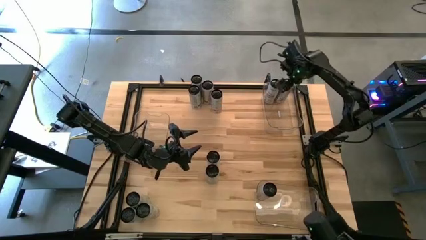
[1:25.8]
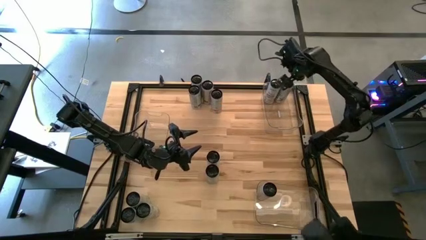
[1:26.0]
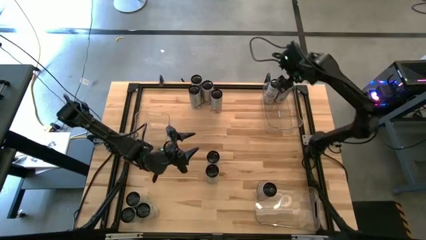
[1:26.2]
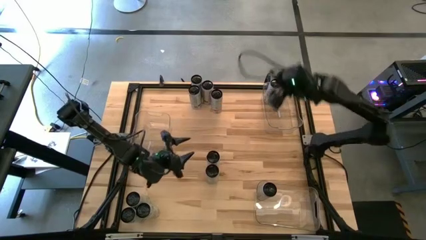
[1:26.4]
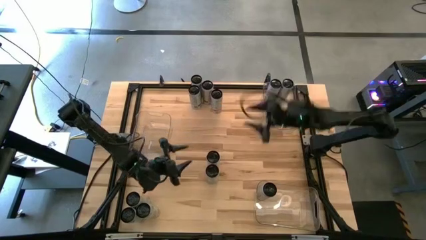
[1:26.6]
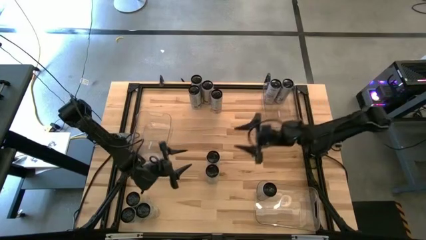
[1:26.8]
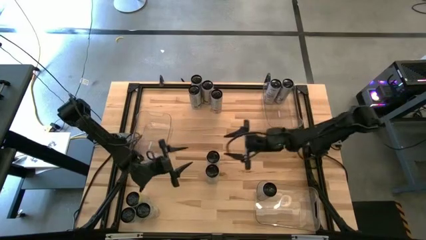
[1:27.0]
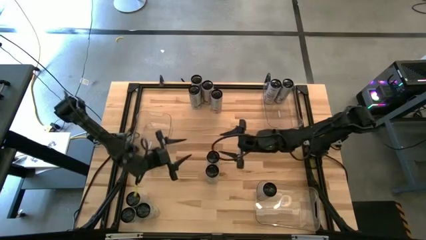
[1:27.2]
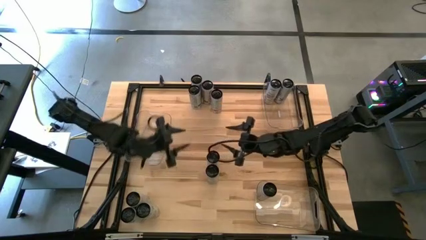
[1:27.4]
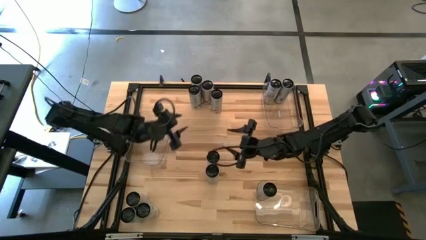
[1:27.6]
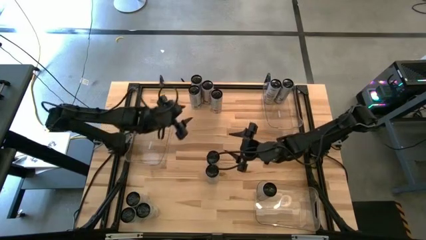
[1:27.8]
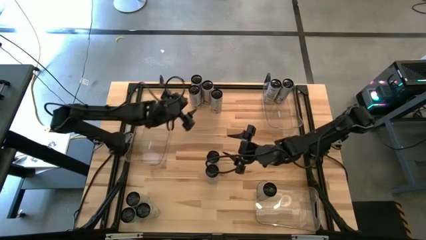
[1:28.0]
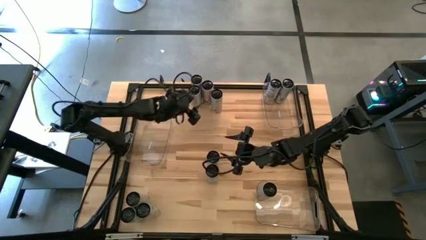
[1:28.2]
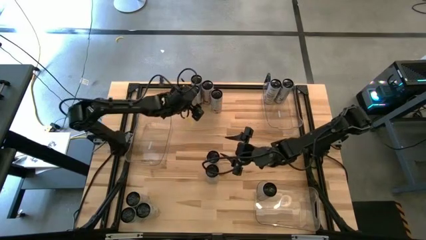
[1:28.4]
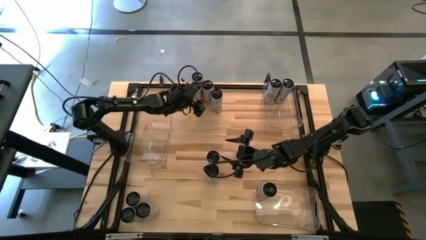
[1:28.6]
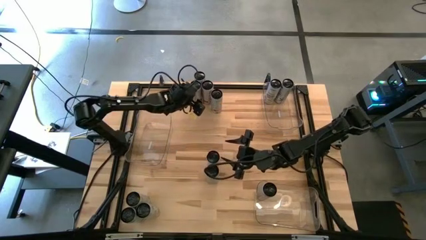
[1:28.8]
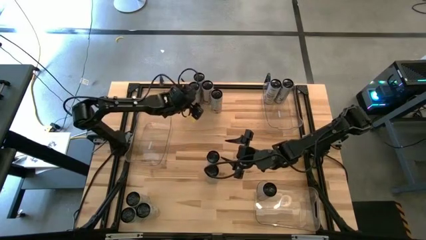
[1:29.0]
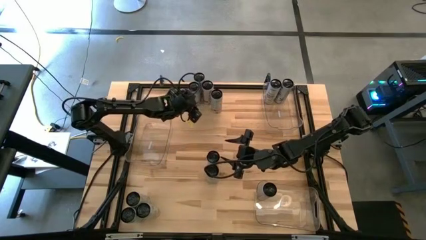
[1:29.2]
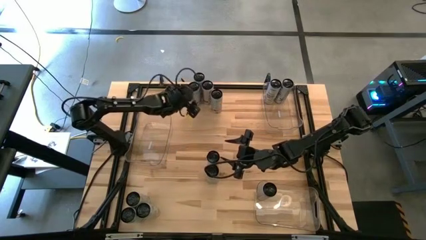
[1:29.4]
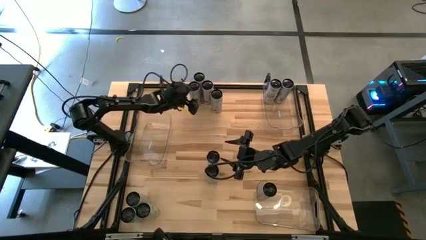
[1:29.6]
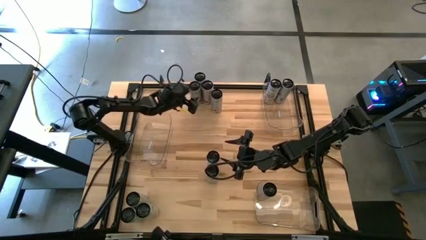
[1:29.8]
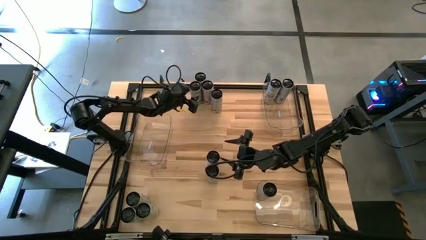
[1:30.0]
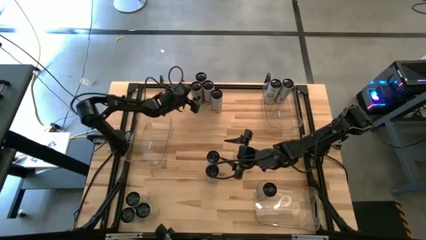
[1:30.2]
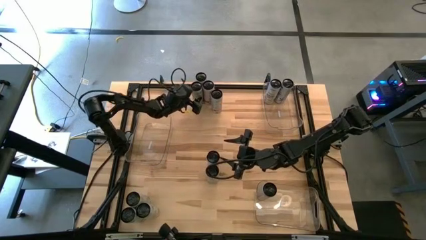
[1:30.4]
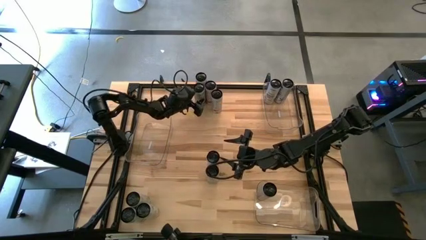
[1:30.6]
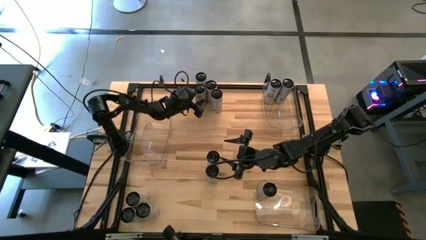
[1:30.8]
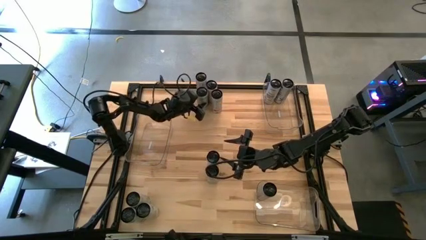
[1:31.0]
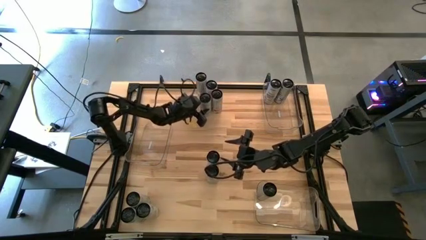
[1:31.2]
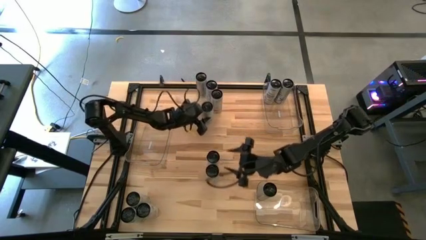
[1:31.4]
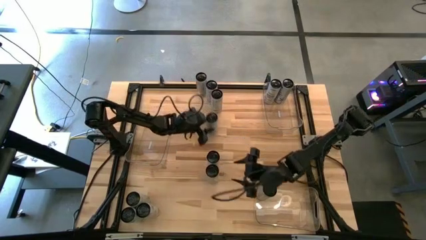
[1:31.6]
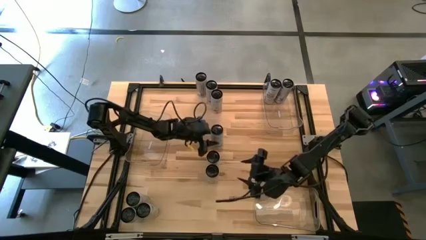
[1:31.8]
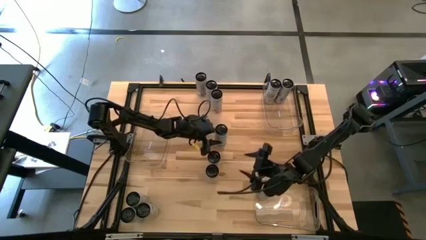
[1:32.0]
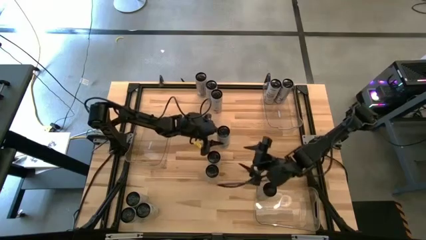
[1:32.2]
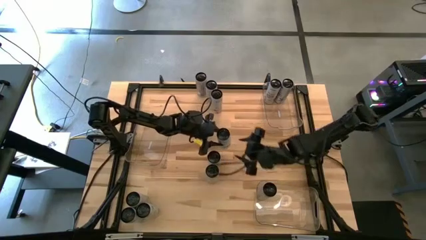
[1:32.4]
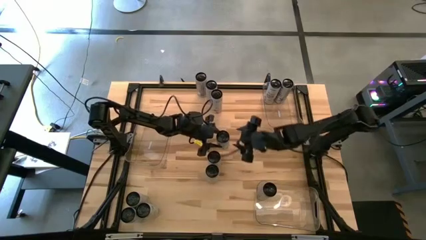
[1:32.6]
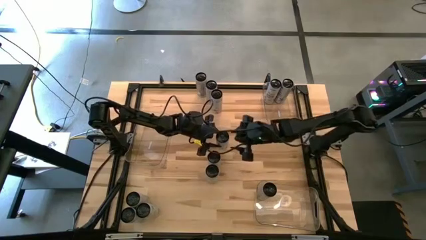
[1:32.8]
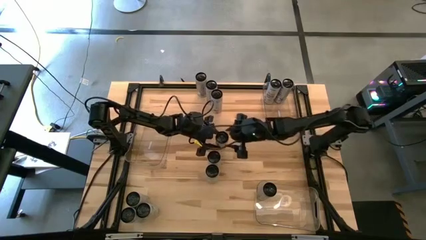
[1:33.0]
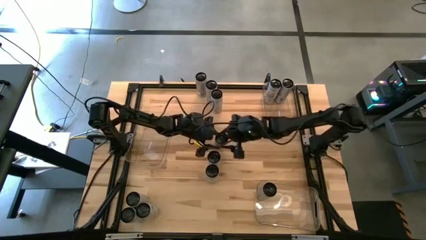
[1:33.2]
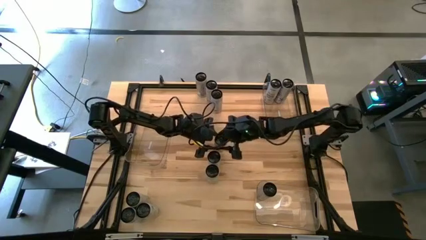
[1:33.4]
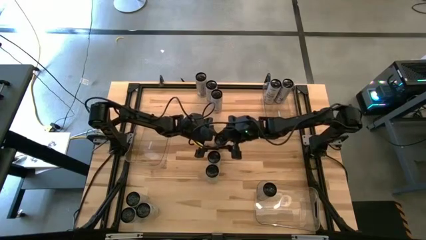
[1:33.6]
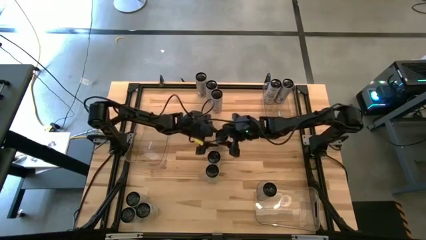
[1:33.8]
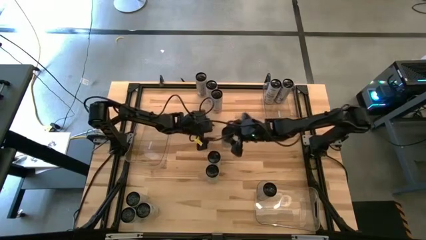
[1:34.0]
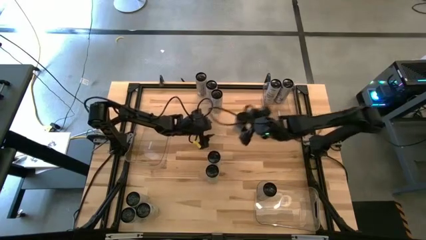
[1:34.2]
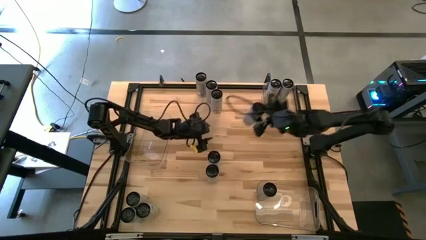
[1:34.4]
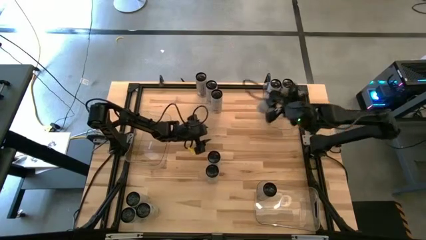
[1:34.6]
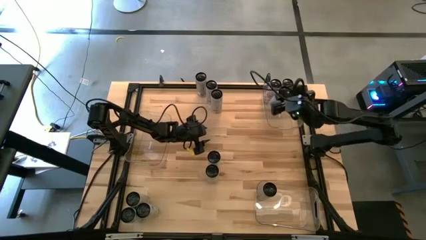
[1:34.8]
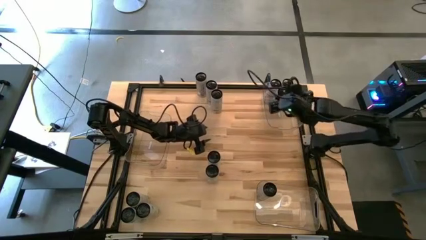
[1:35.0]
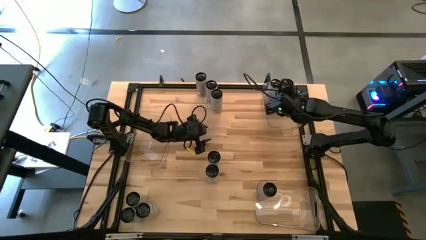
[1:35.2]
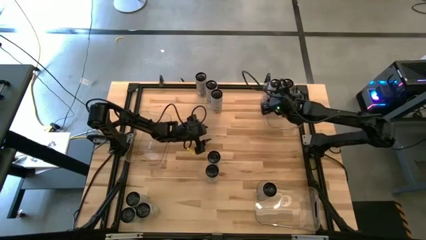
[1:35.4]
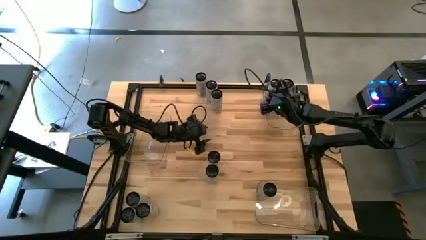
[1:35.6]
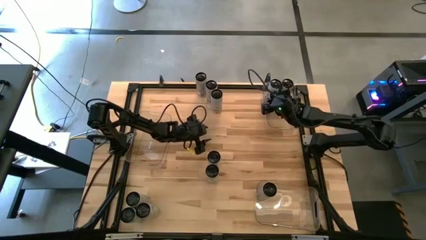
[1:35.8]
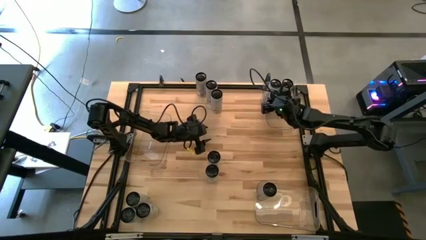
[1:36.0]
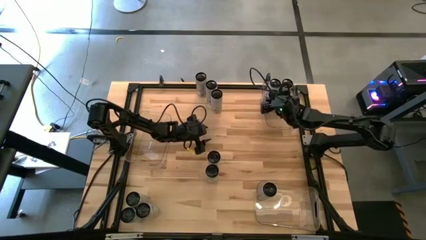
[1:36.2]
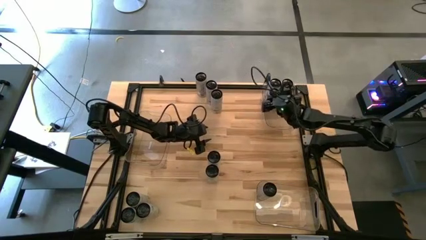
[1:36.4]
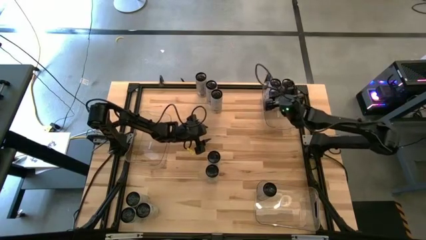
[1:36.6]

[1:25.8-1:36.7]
Task: Sort soda cans
Put the white-blue soda can into the top transparent bin

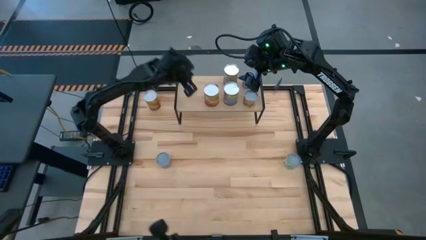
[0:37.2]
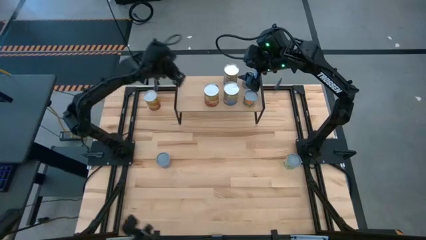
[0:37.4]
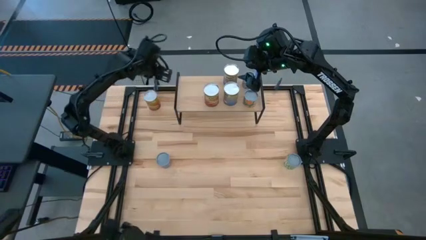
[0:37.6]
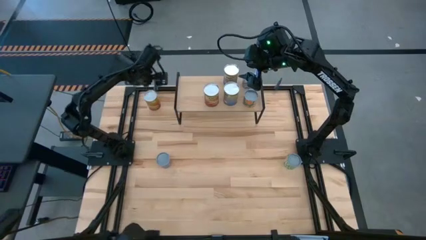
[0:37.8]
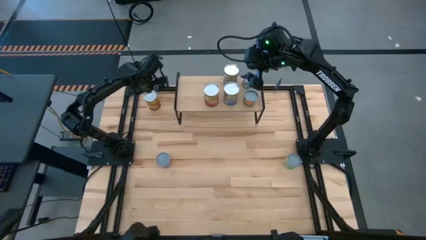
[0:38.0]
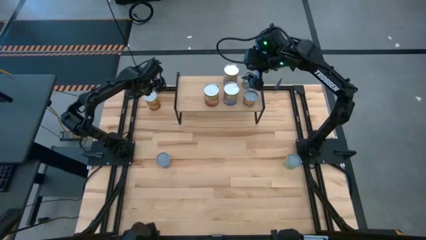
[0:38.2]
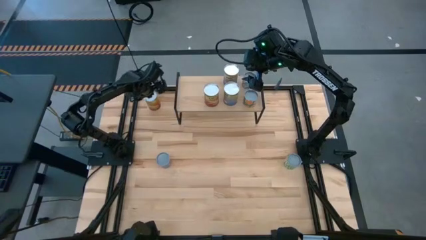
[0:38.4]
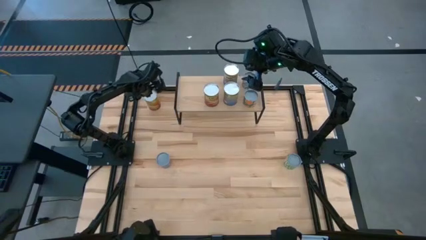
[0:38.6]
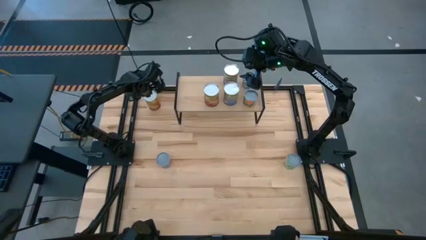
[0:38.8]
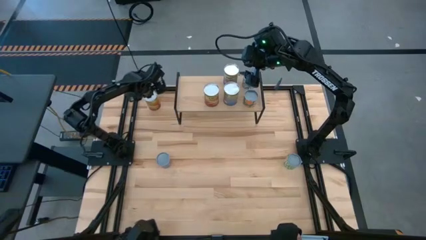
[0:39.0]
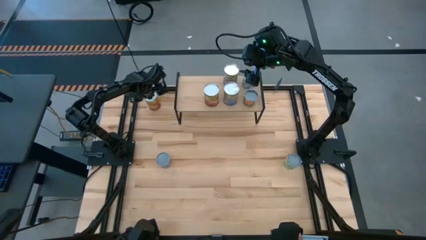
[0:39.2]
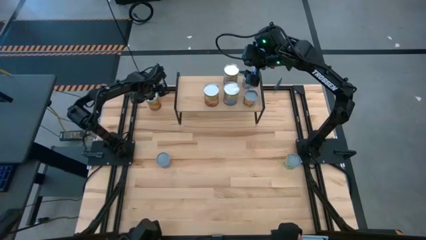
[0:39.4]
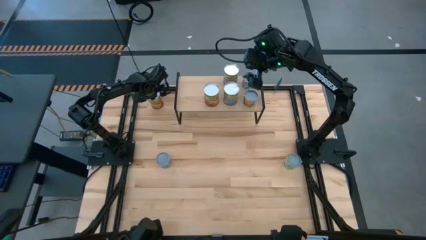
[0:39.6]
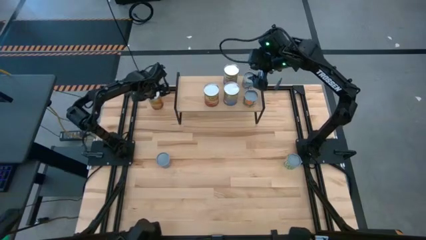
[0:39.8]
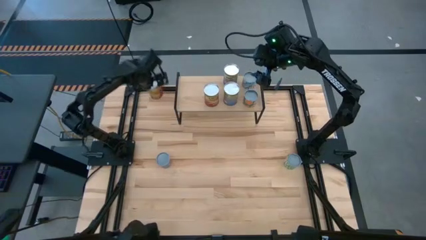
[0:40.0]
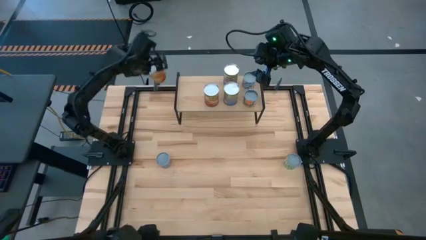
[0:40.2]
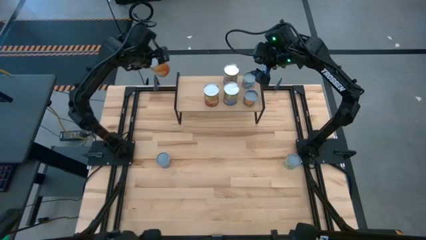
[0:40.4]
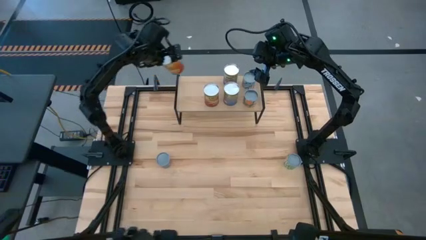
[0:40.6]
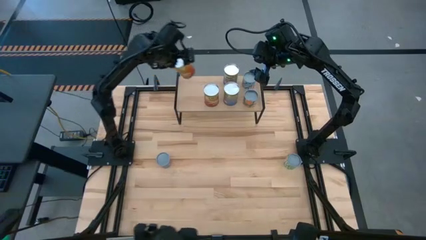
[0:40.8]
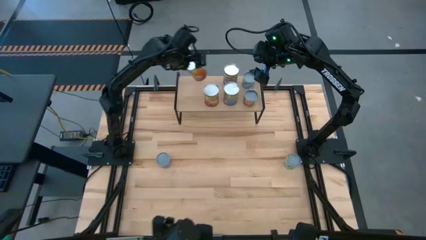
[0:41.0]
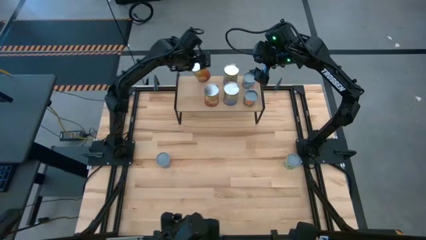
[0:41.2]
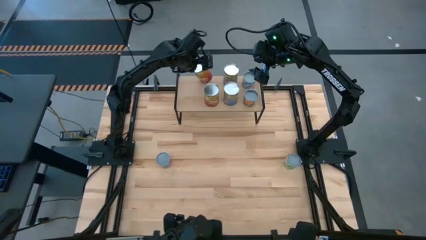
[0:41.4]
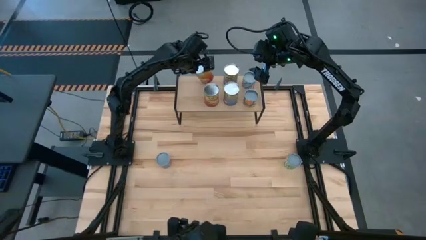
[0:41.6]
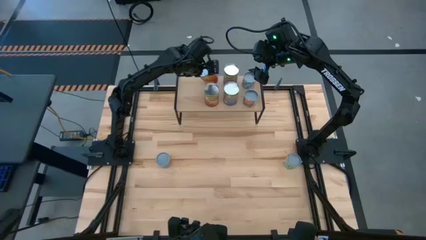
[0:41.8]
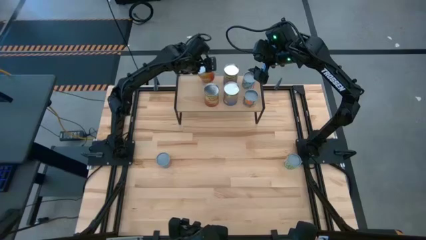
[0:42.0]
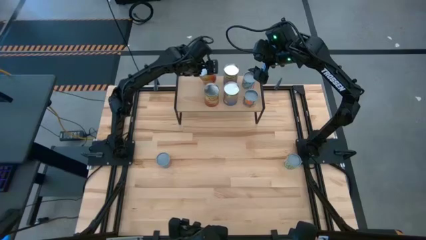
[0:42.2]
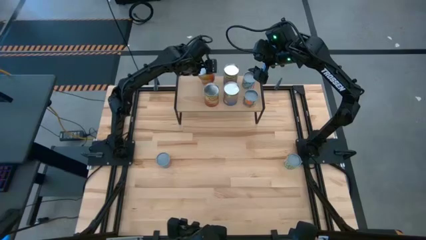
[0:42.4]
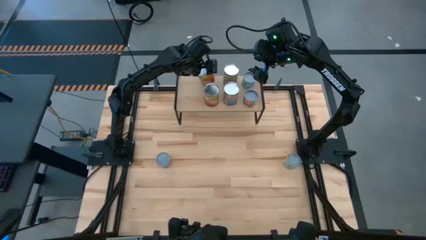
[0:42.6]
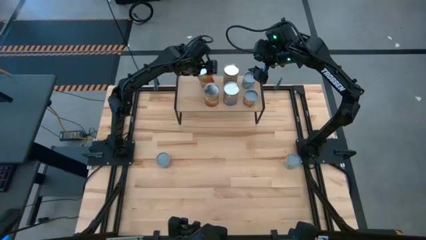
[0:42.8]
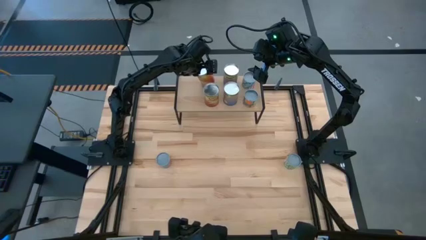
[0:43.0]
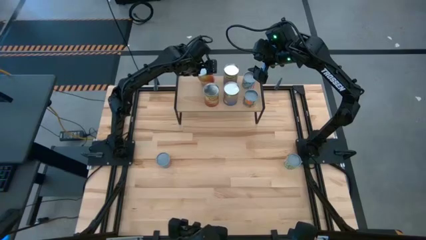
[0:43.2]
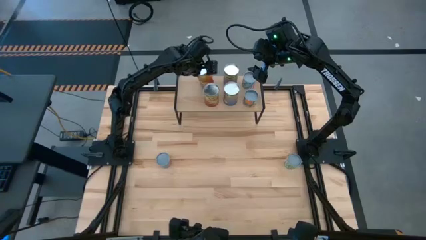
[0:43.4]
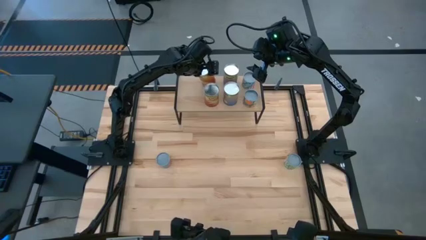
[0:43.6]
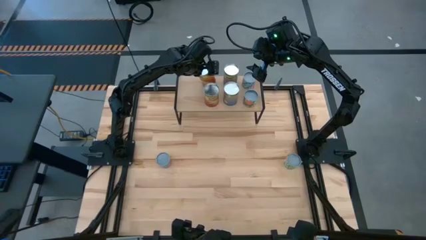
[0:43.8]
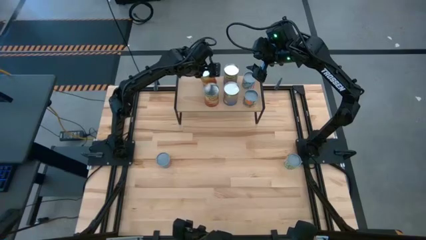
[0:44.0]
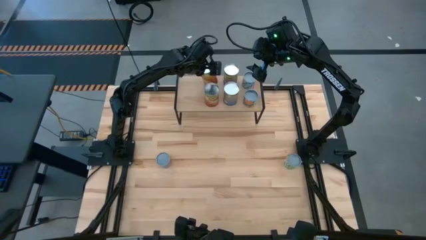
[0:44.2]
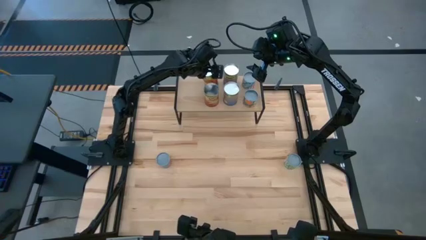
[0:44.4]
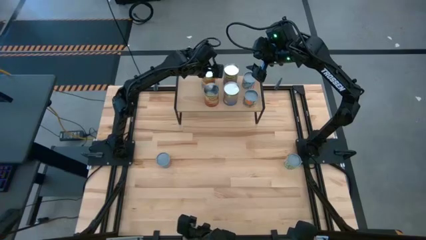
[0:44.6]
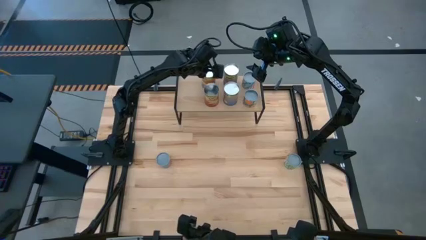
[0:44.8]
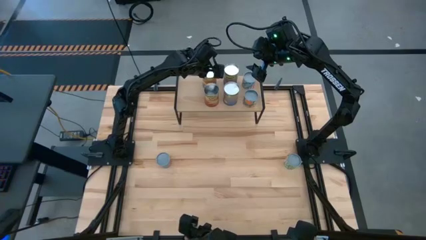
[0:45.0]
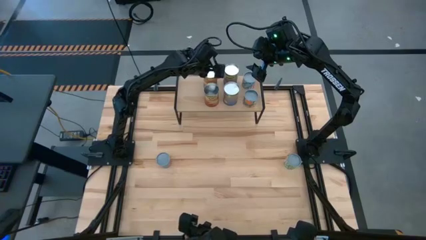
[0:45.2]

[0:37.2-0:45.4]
Task: Pick and place cans onto a shelf
Put the canned corn on the shelf aligned with the other canned corn
